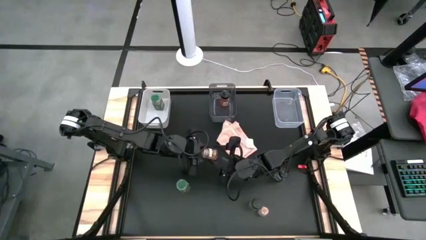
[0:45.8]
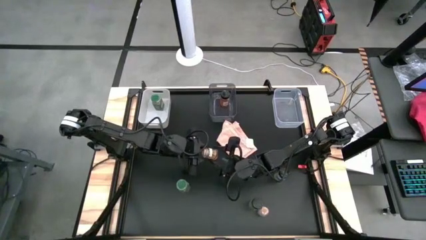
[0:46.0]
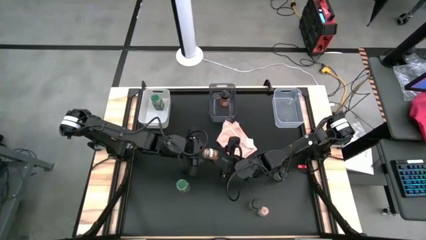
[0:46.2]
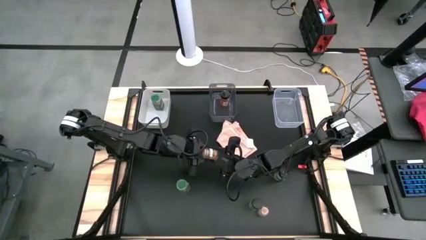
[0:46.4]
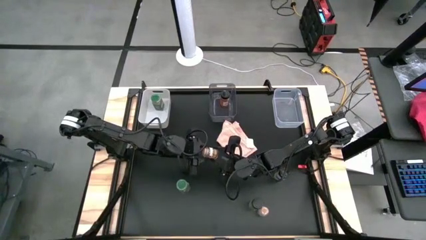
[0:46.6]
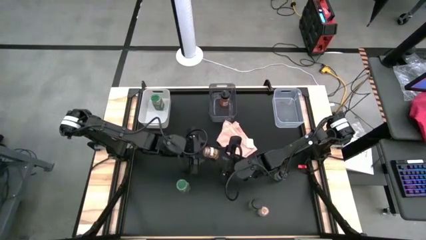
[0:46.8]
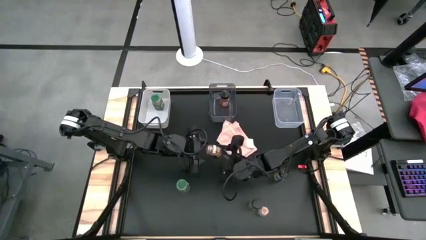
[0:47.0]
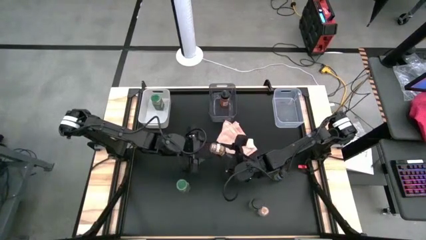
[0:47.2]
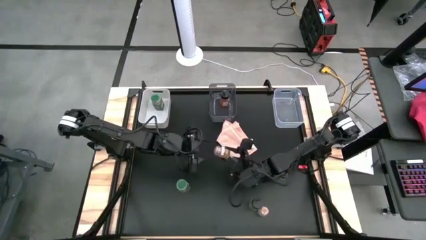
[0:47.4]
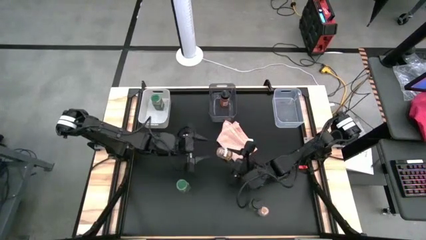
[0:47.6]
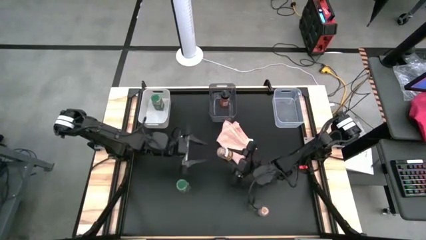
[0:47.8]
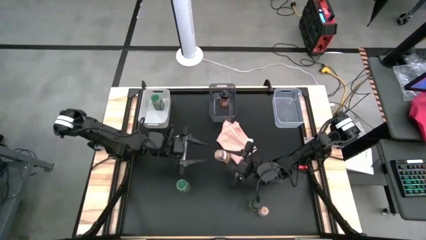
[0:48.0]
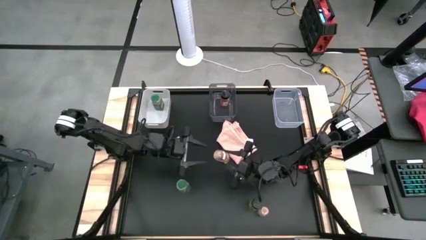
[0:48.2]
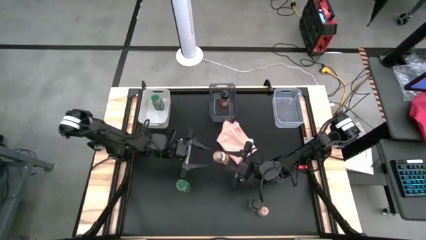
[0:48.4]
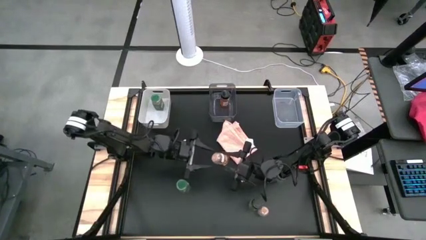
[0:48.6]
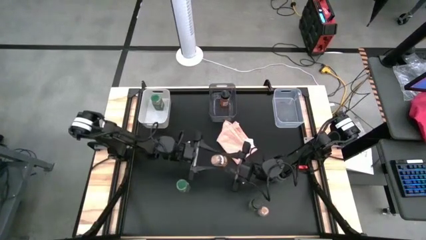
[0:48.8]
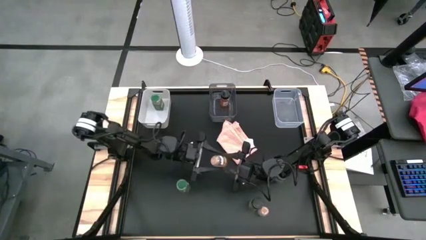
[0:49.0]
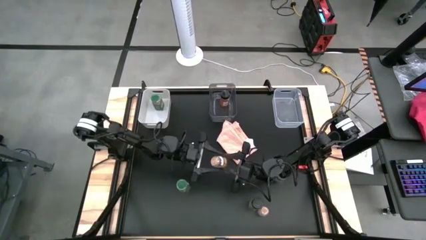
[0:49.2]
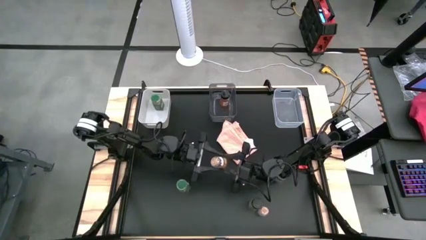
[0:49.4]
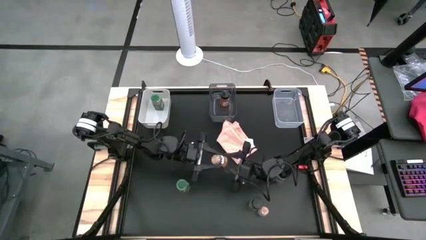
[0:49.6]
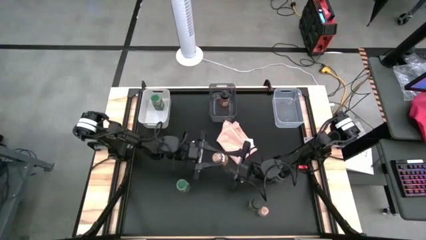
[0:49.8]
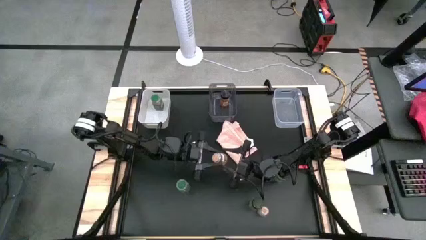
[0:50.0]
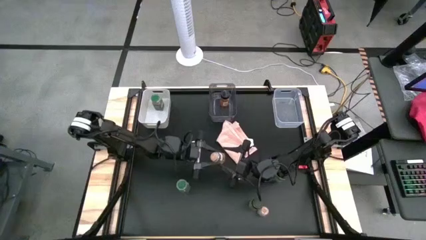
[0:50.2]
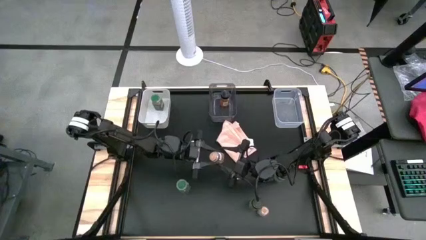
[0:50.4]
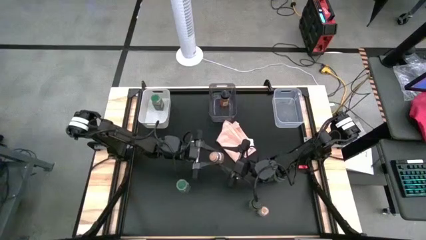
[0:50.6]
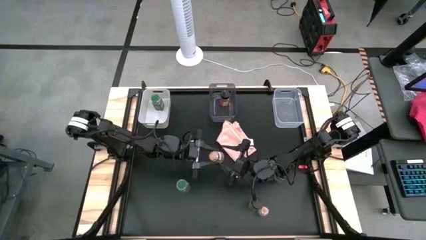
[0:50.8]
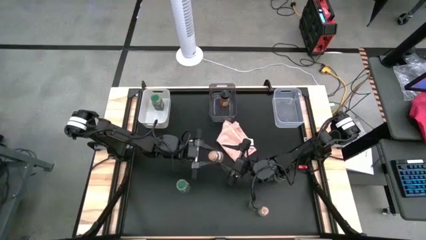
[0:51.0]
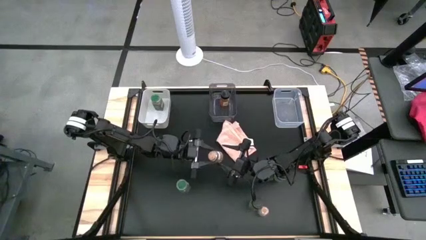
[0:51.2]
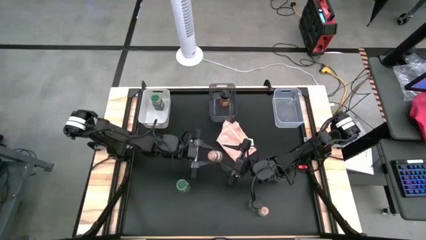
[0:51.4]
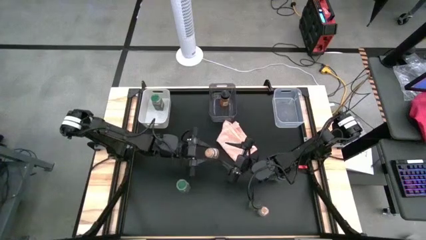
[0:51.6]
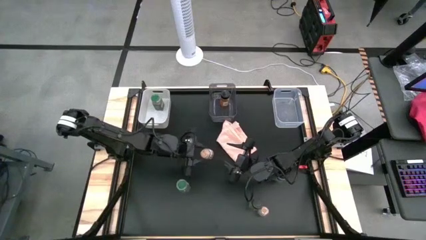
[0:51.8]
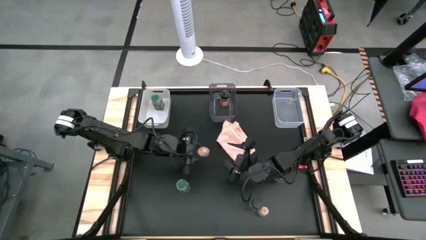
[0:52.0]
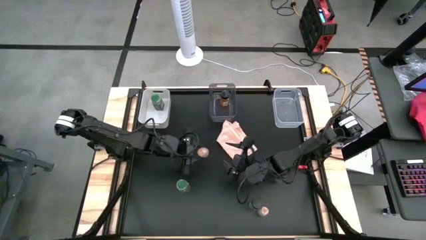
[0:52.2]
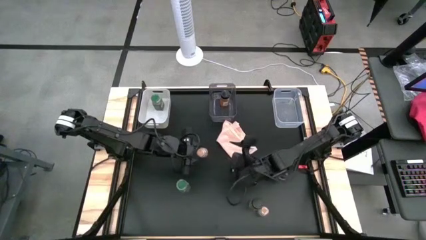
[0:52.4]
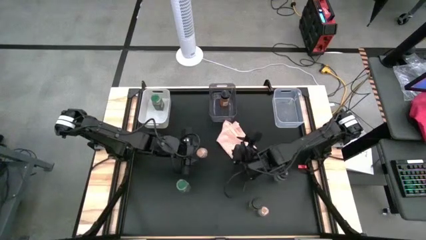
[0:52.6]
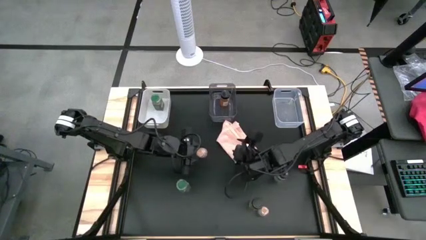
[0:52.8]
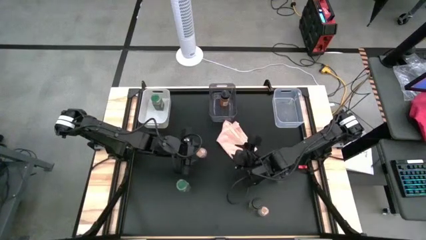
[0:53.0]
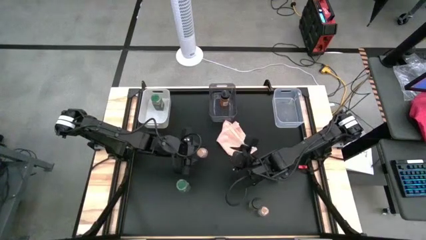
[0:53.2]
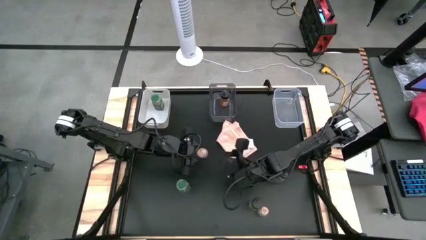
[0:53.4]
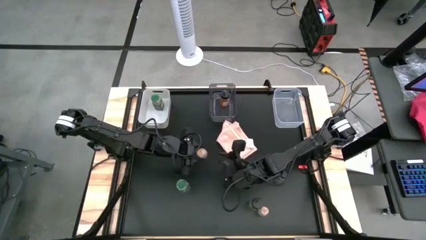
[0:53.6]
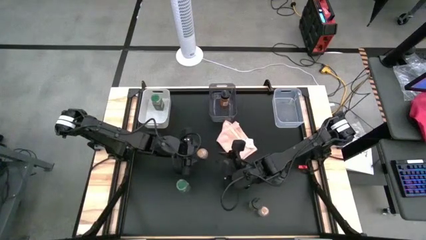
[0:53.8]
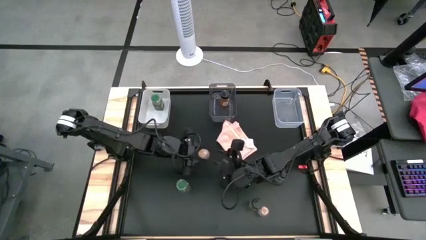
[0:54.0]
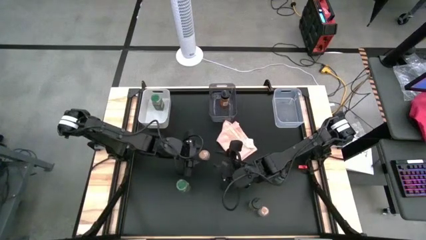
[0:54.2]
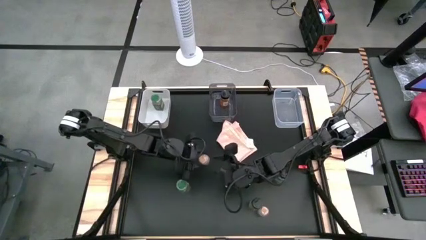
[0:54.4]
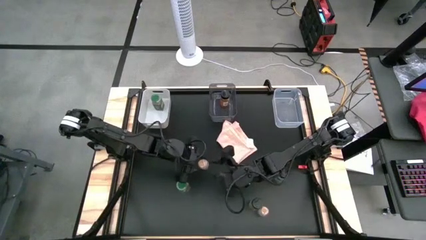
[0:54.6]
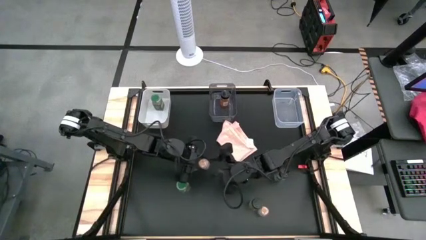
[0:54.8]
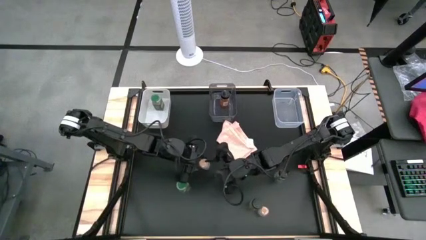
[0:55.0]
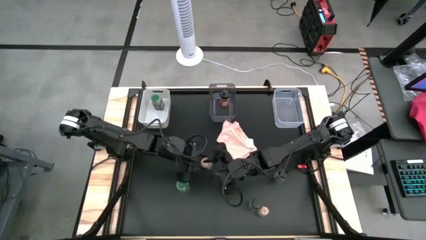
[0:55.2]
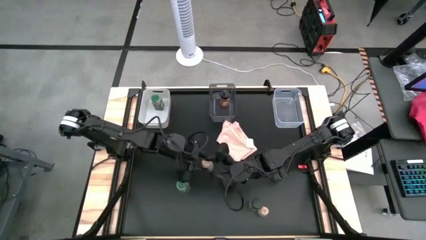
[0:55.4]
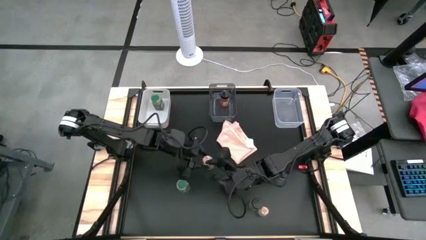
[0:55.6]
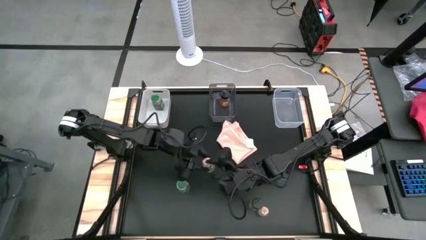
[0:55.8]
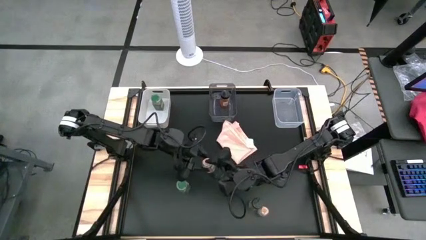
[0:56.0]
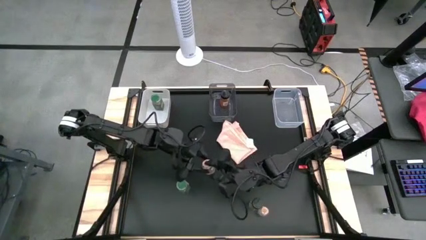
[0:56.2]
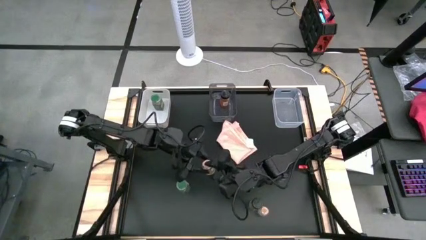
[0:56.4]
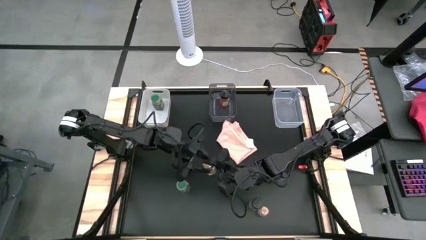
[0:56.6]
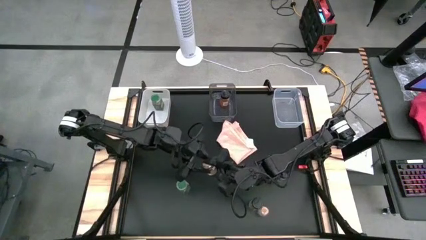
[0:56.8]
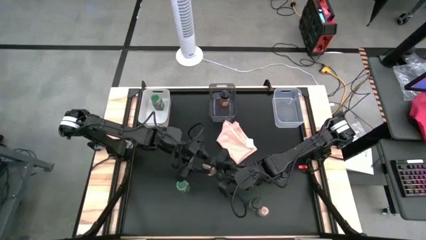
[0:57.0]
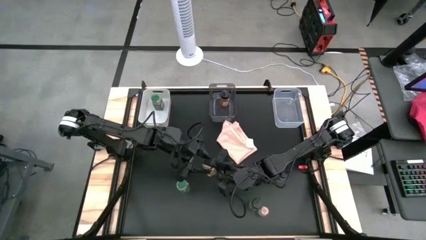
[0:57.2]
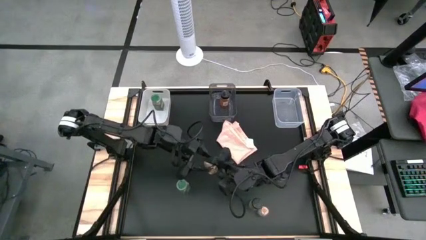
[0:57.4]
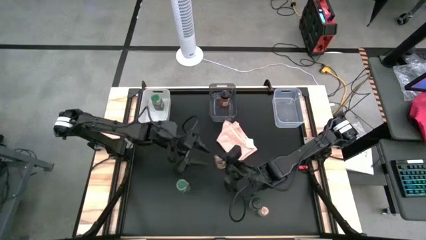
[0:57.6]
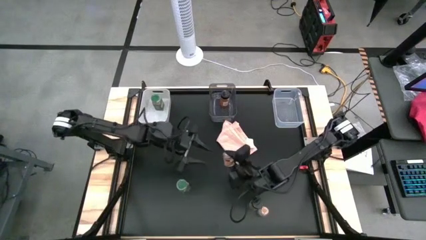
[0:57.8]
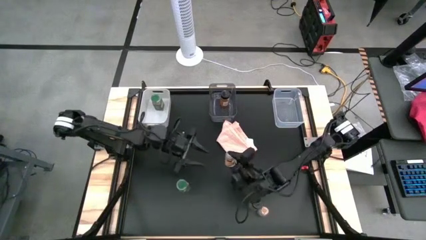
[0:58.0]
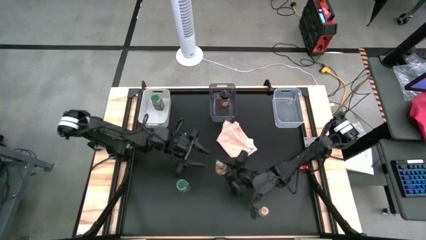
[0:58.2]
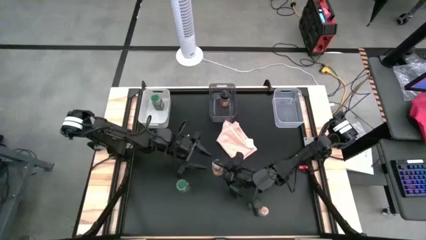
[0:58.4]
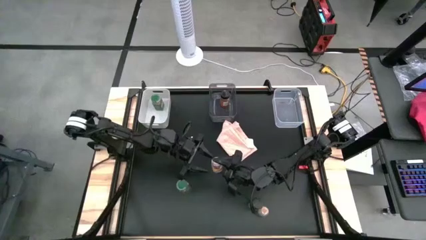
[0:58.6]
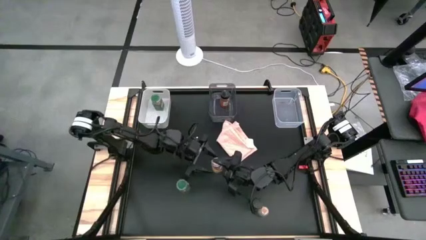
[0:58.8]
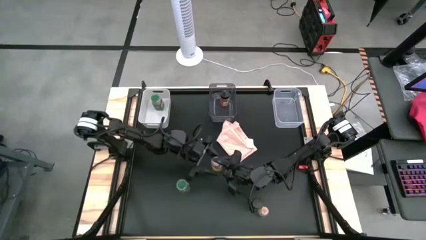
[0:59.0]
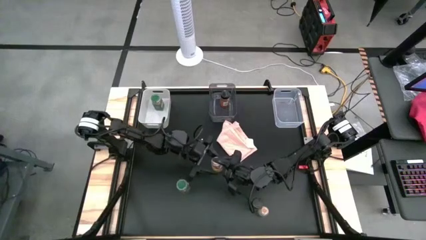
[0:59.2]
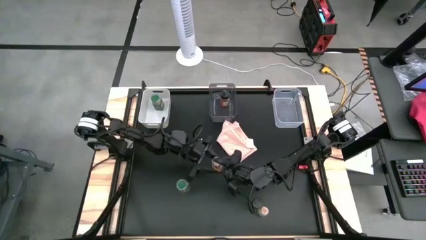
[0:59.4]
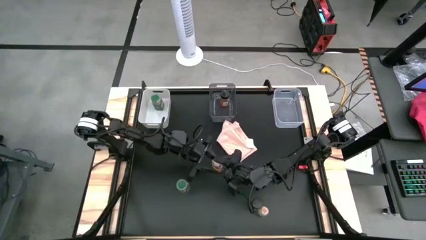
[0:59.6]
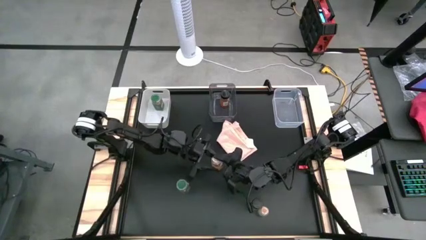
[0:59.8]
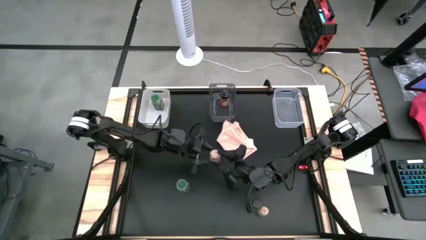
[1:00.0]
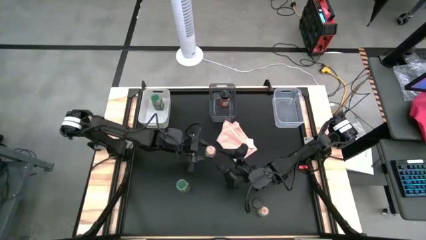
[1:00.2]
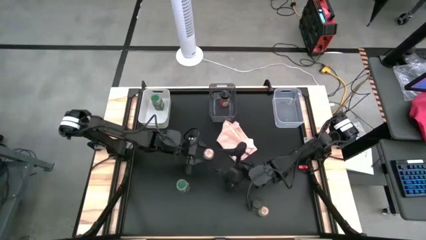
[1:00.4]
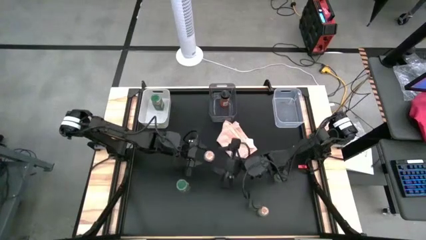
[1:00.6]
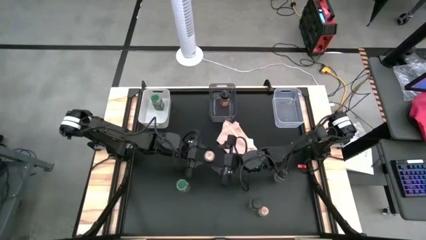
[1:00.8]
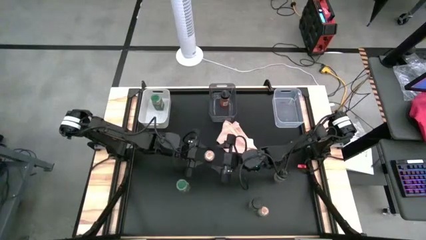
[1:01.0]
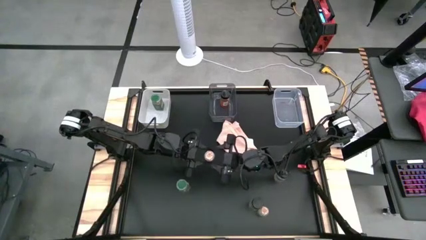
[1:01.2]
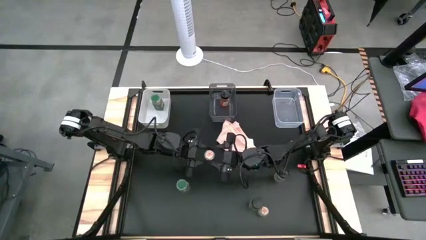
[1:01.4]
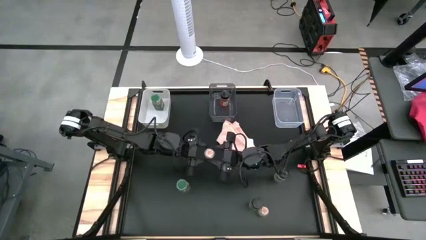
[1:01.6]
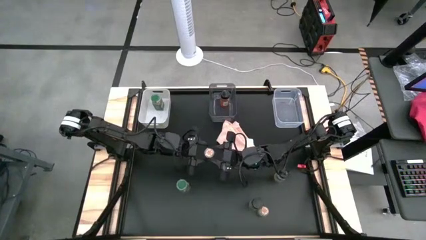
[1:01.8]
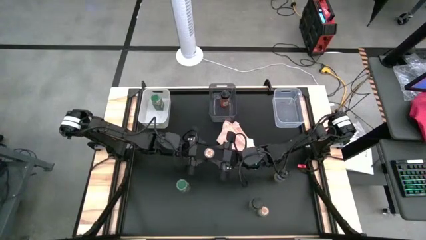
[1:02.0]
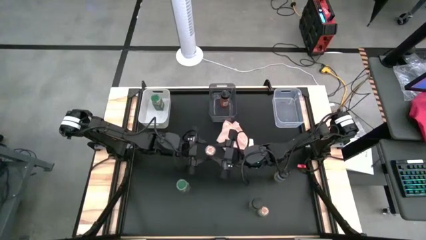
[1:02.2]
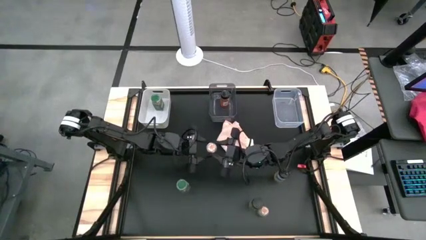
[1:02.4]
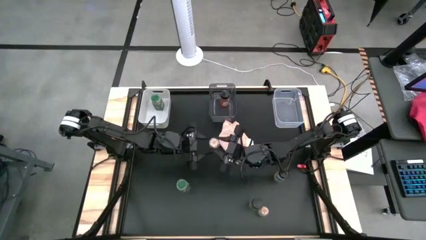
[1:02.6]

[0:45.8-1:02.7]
Task: Sort spices by type
Put the left brown seasoning bottle into the transparent bin
